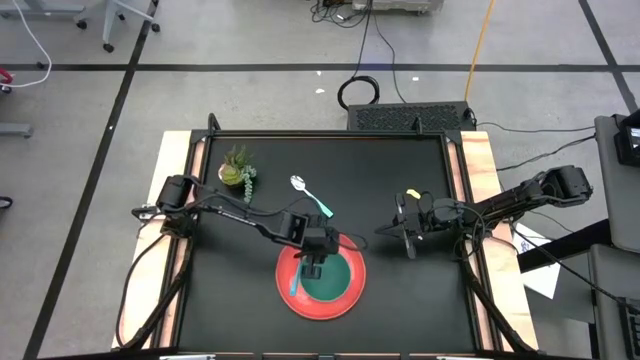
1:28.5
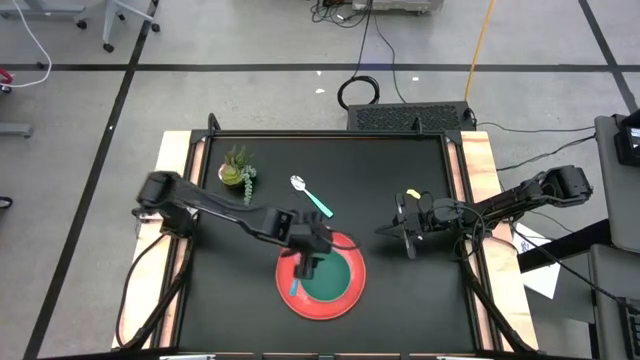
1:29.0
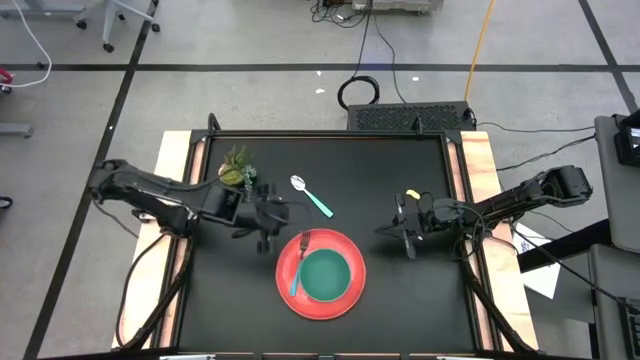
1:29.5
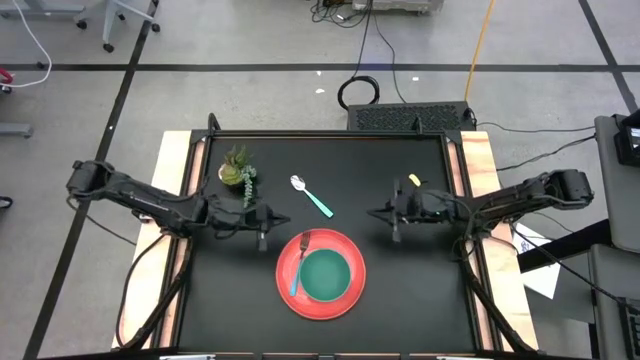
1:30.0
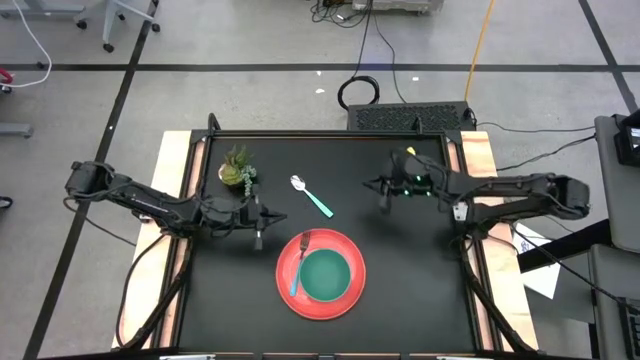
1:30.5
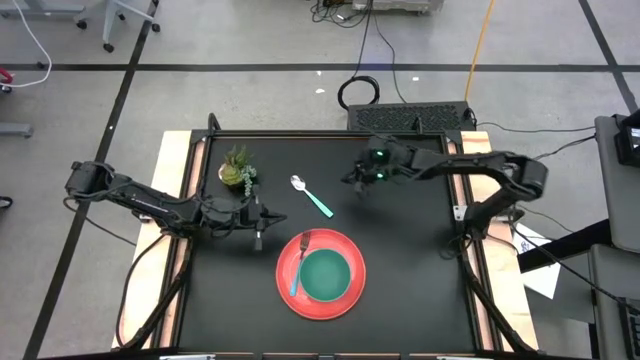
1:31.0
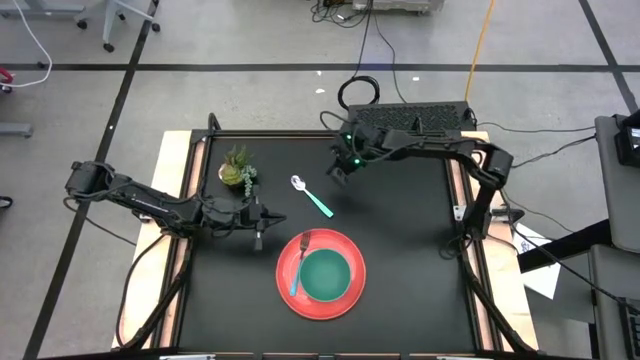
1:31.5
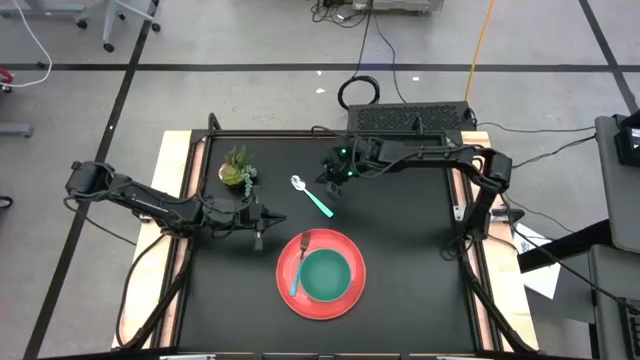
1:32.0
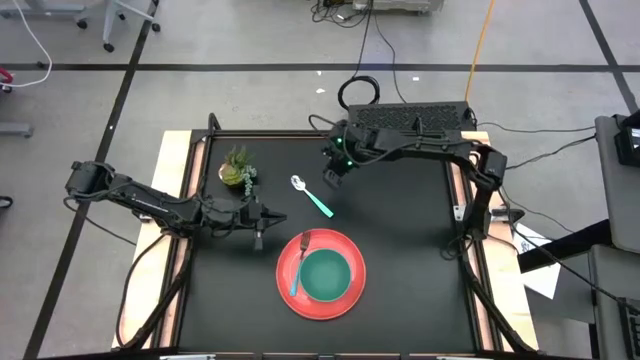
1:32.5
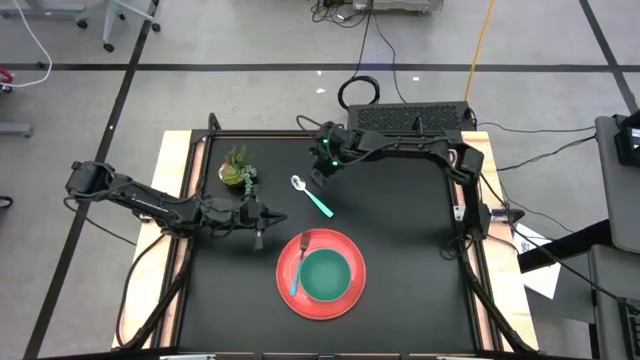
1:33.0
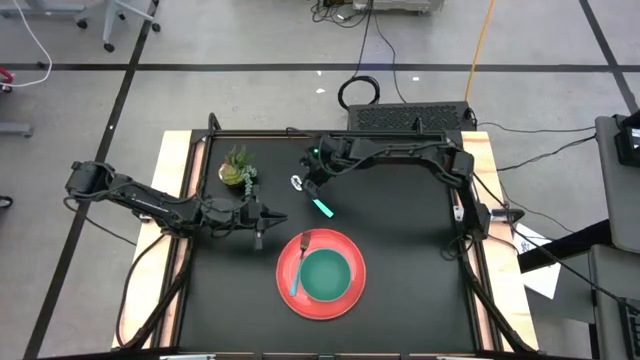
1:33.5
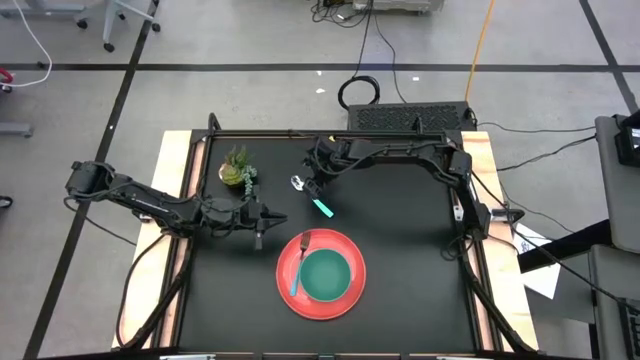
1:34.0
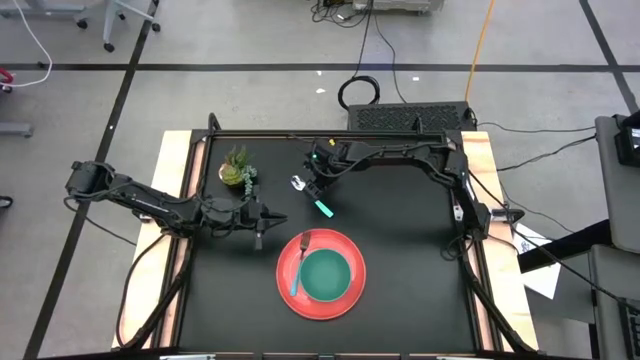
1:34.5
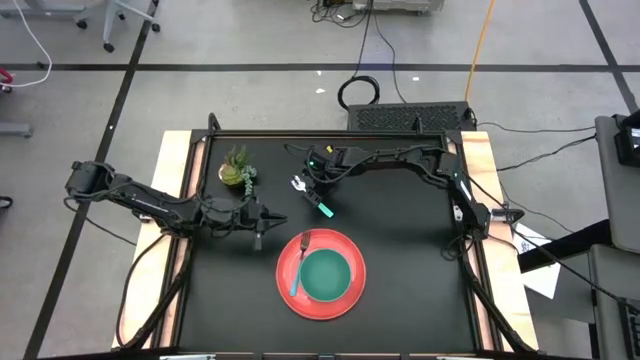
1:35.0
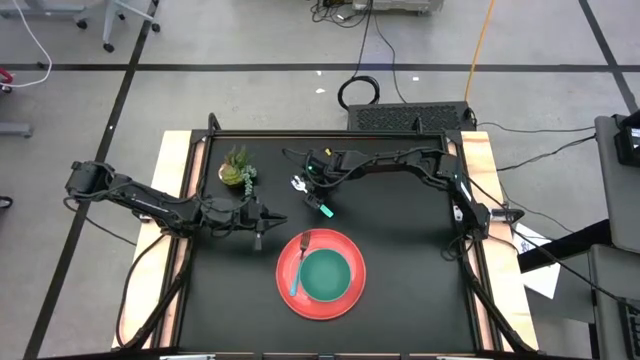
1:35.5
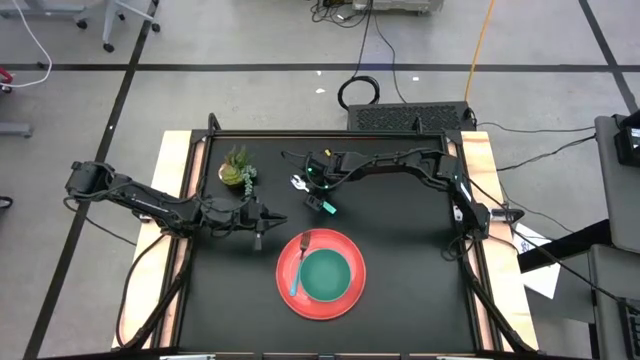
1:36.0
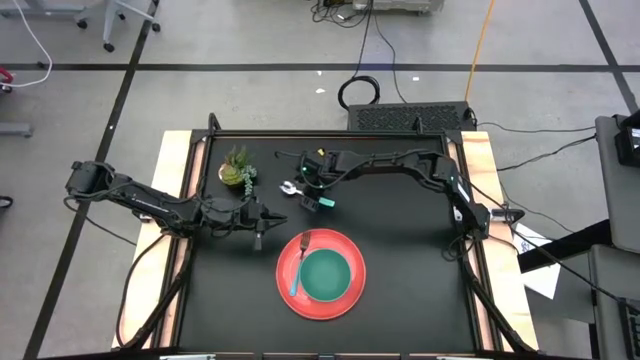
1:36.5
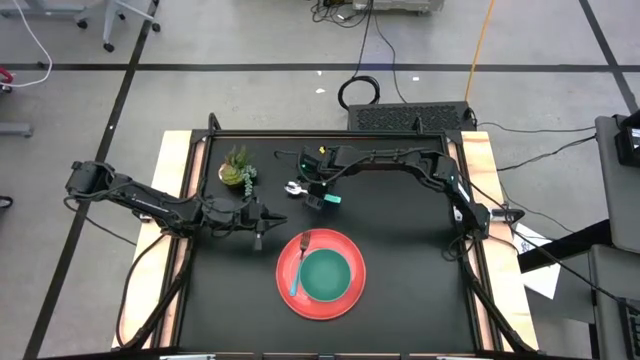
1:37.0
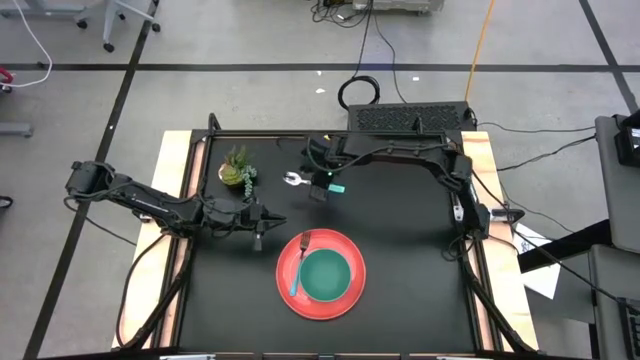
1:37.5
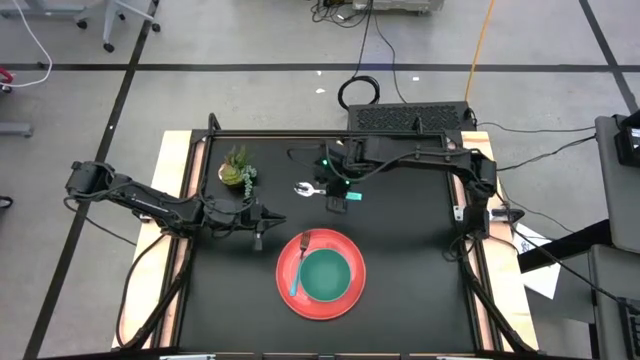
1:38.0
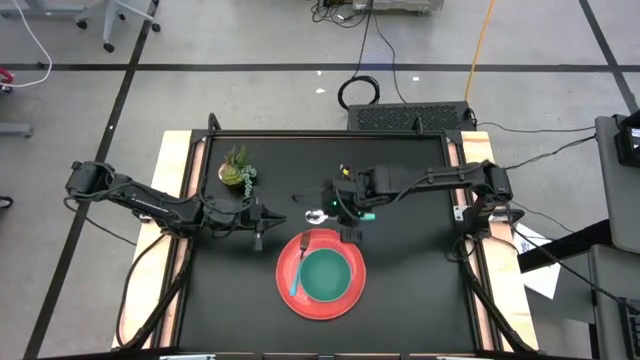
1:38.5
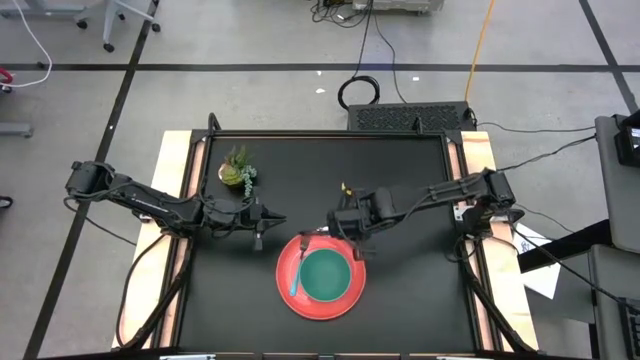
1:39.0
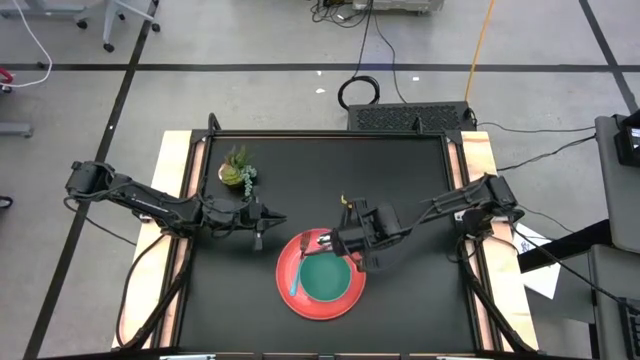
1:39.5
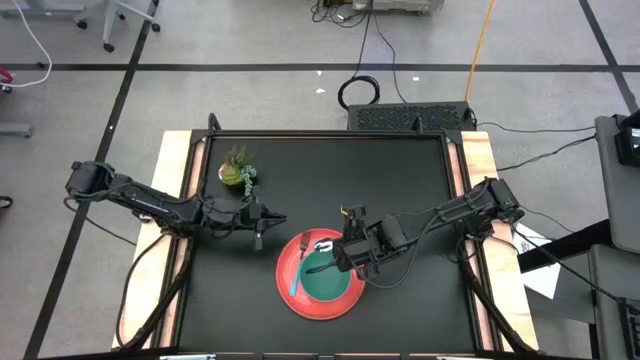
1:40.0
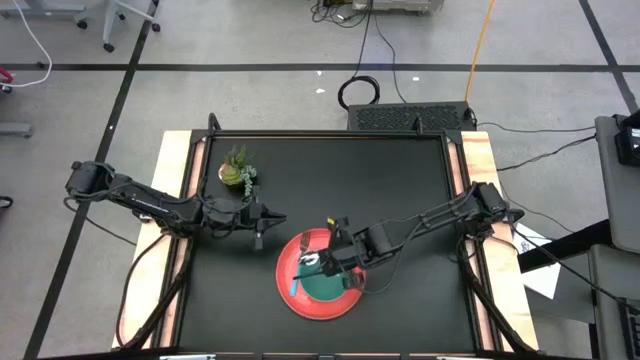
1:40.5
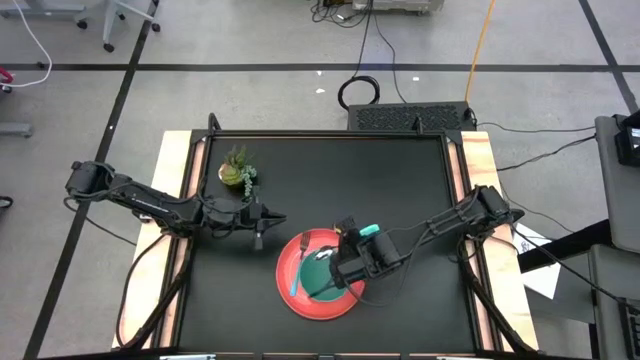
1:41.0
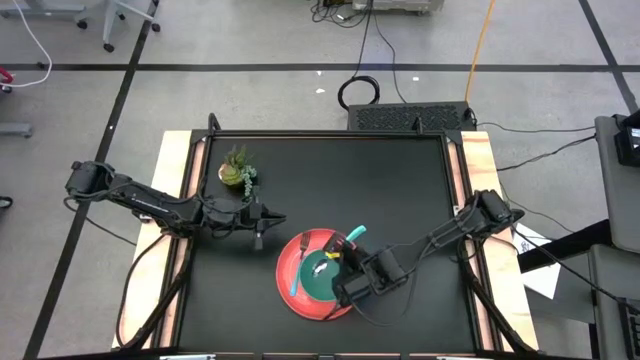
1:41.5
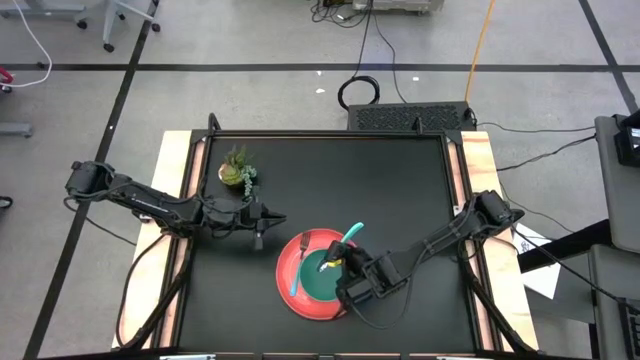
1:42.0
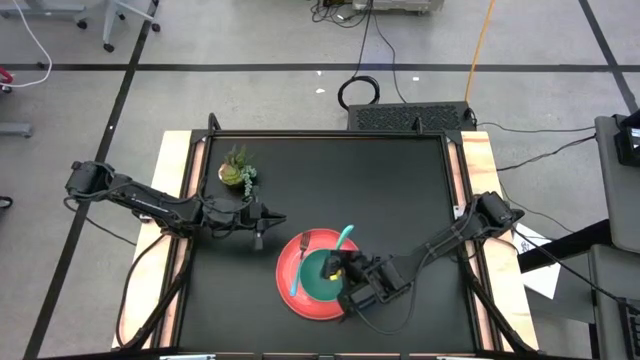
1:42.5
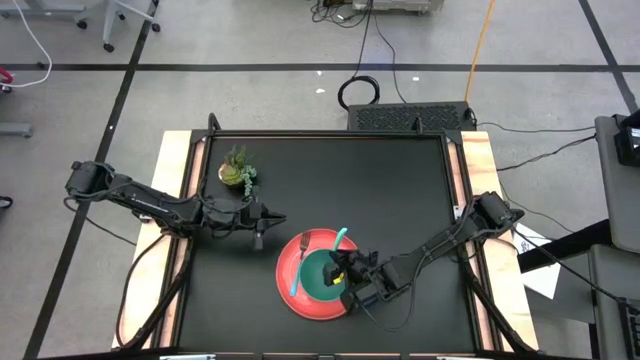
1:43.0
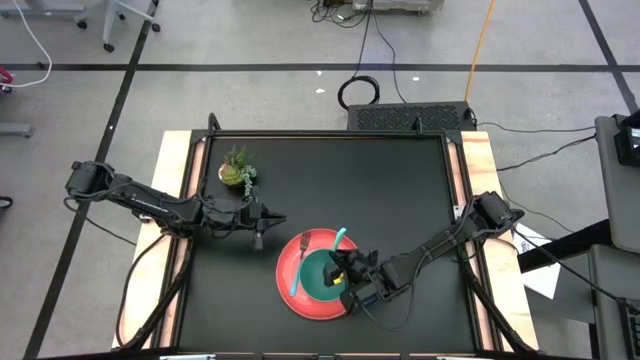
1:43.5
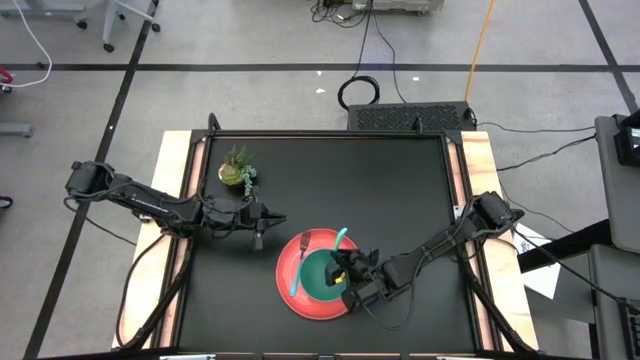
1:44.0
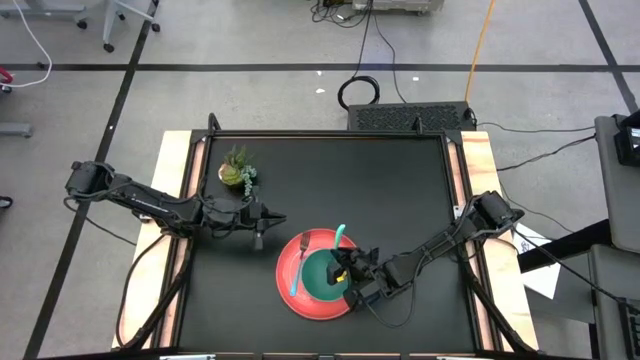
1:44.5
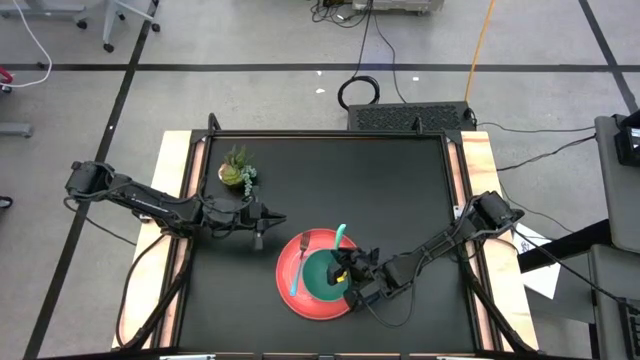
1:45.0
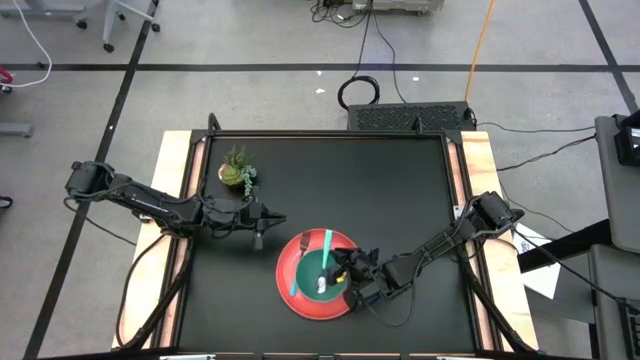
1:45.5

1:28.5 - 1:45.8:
Task: Set table place
Put the light blue spoon into the green bowl

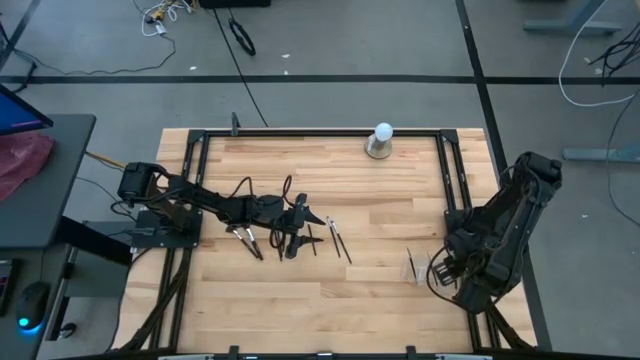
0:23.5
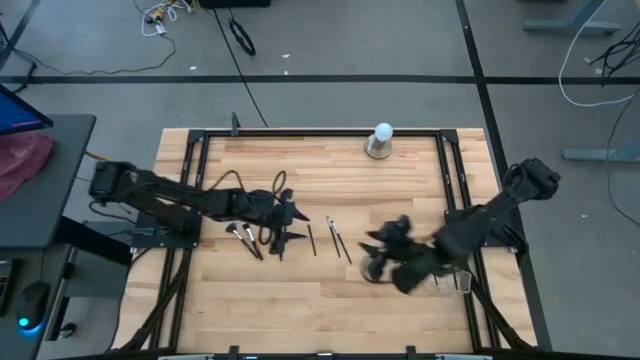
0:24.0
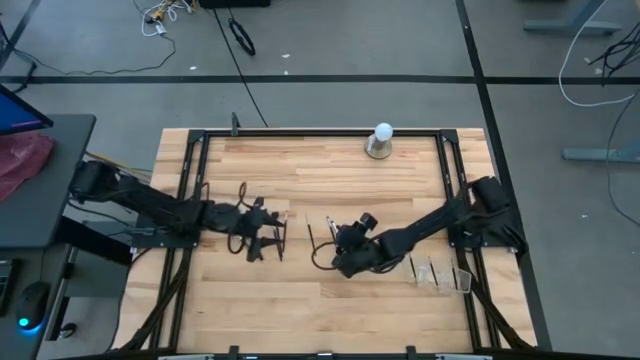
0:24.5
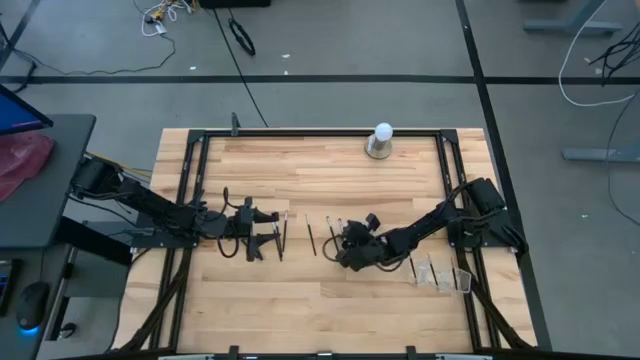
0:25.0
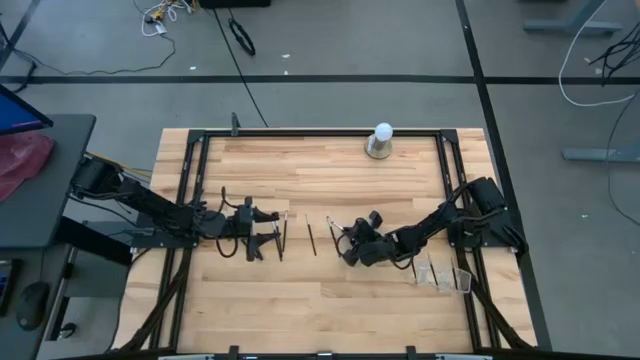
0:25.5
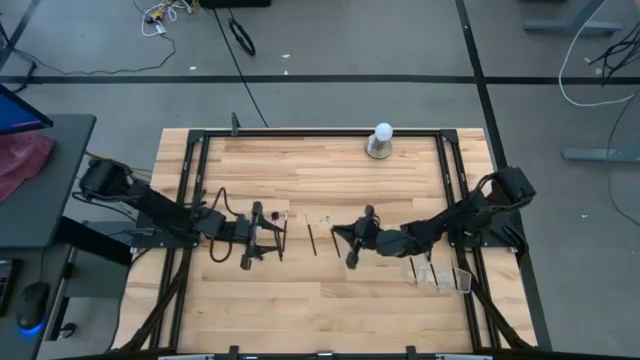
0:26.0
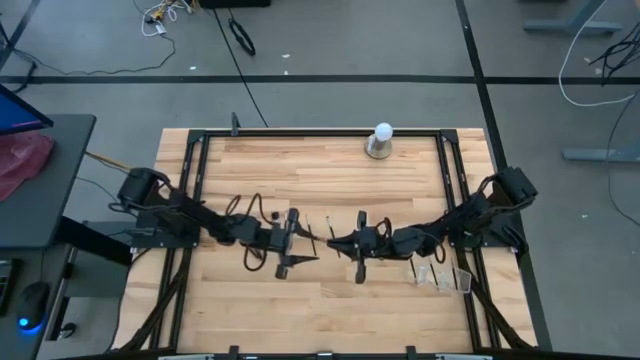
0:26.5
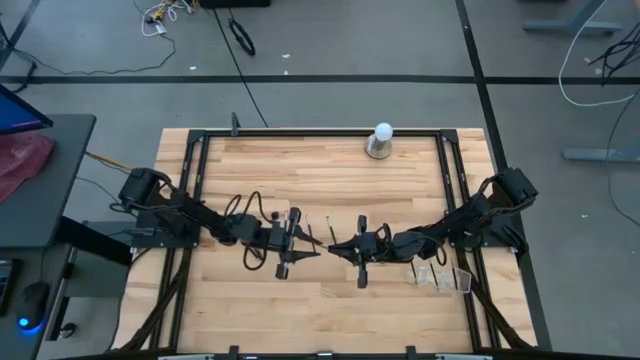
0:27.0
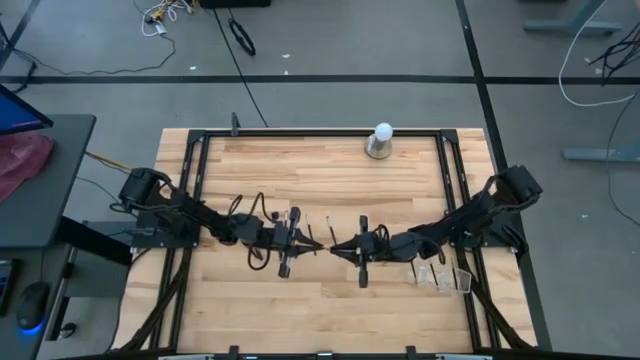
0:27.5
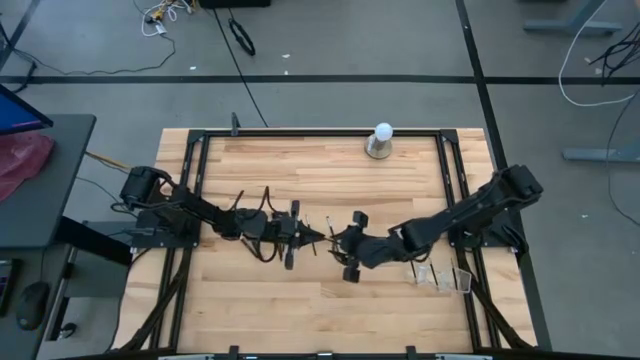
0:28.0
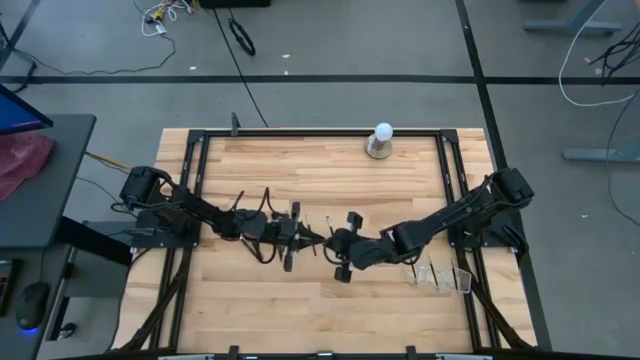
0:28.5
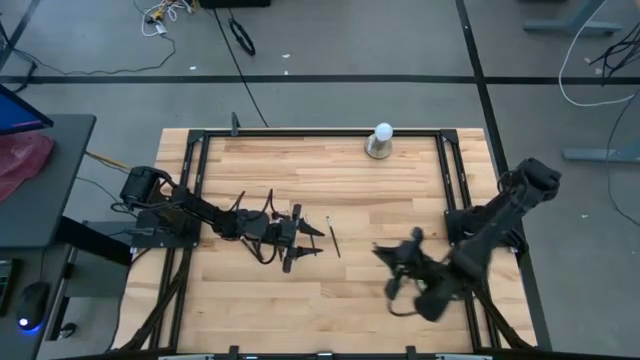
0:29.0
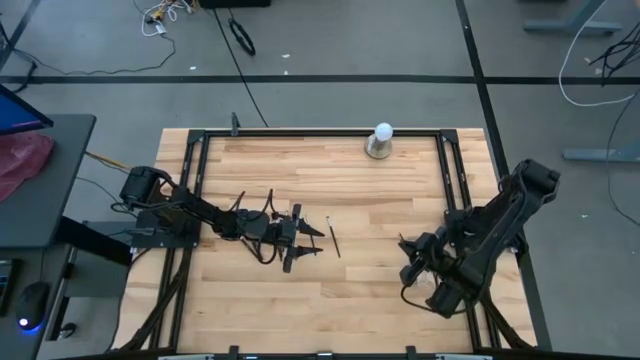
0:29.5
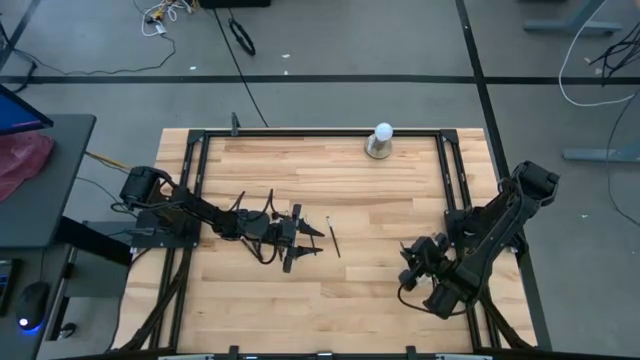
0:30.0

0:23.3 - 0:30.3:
Task: Put items in baskets/containers
Put the black eyeshadow brush into the transparent organizer
